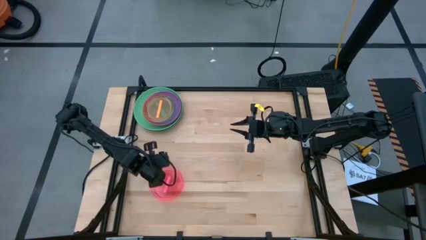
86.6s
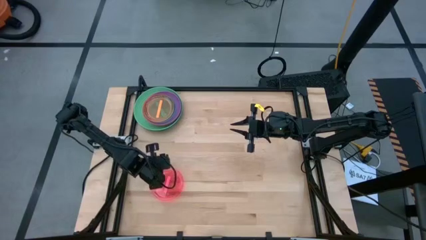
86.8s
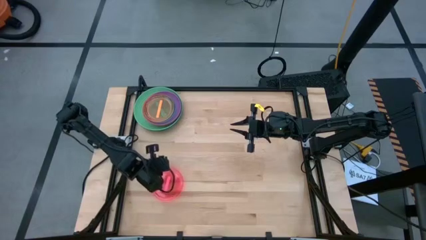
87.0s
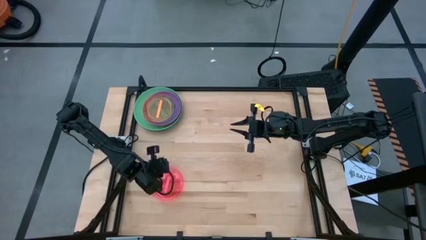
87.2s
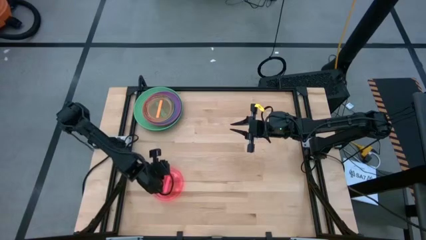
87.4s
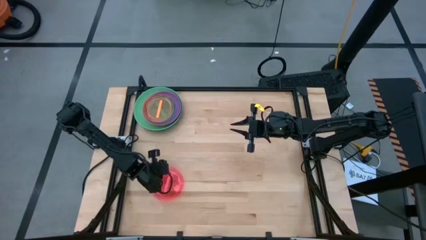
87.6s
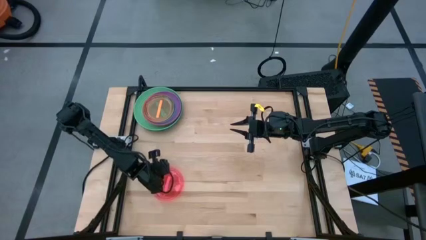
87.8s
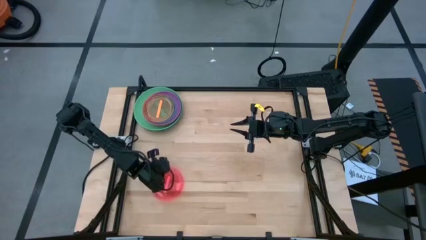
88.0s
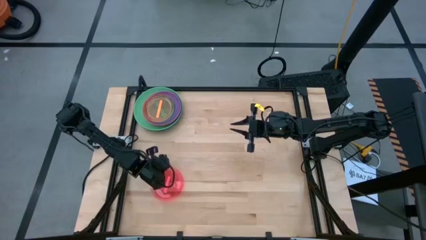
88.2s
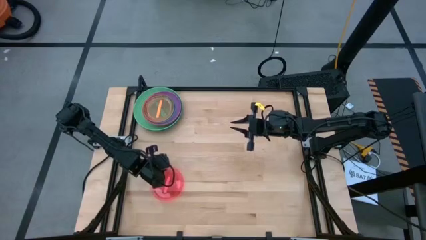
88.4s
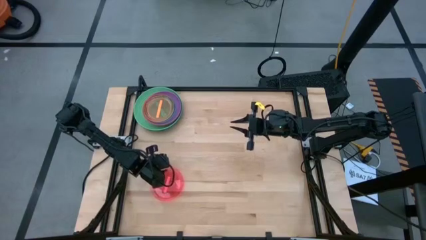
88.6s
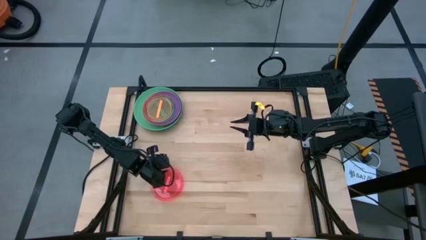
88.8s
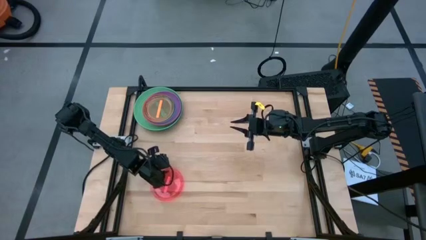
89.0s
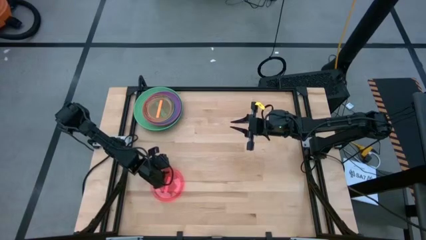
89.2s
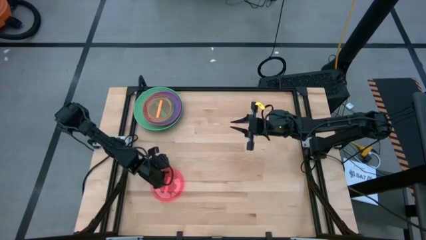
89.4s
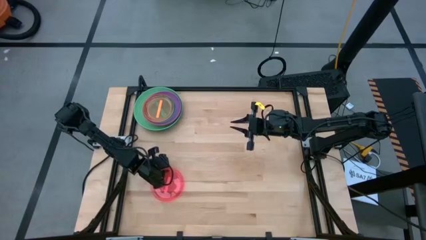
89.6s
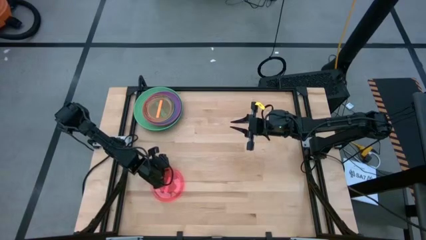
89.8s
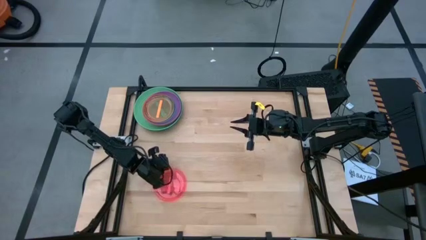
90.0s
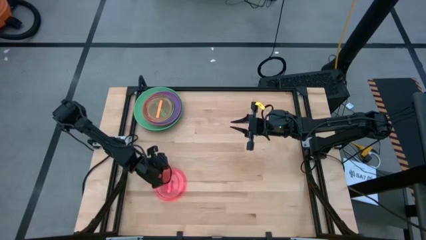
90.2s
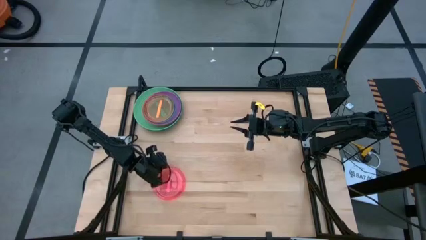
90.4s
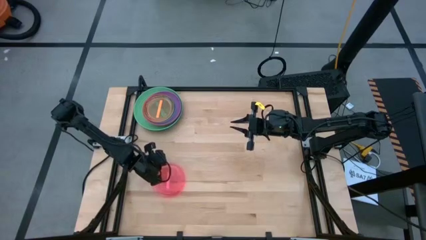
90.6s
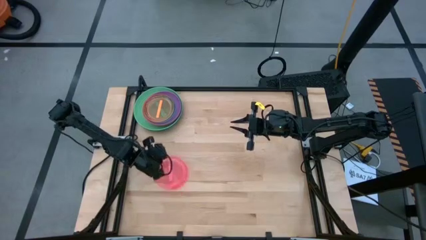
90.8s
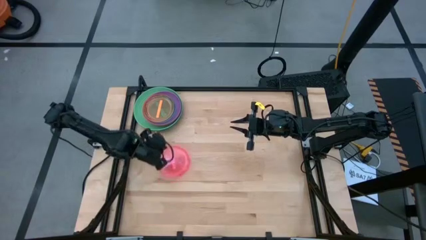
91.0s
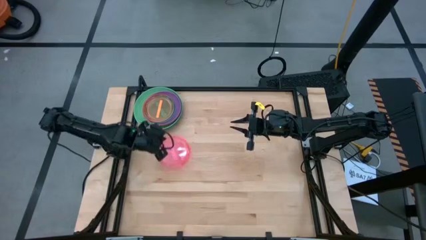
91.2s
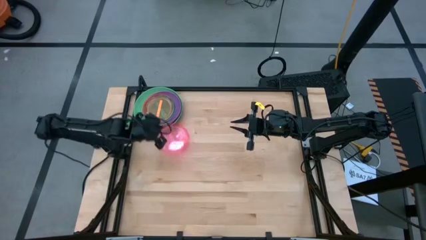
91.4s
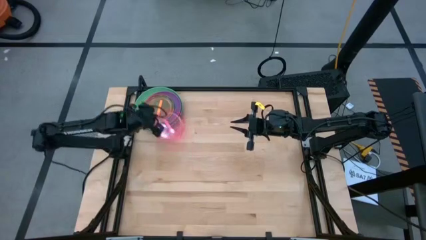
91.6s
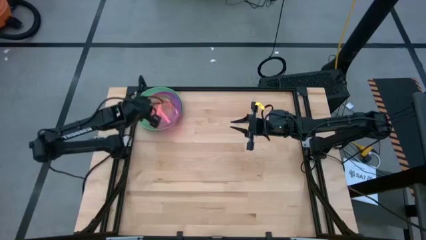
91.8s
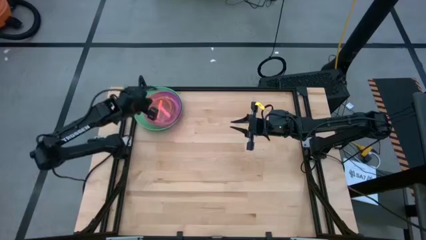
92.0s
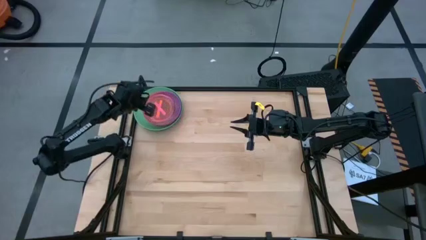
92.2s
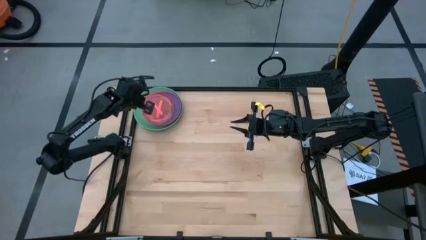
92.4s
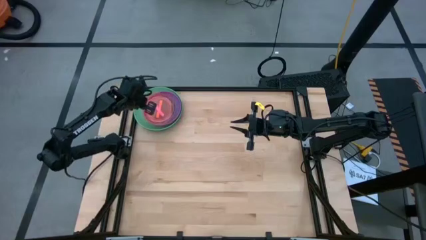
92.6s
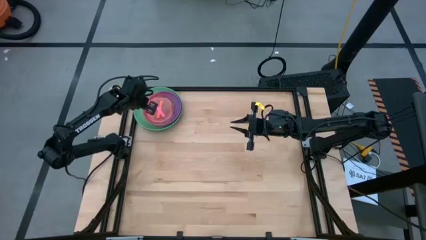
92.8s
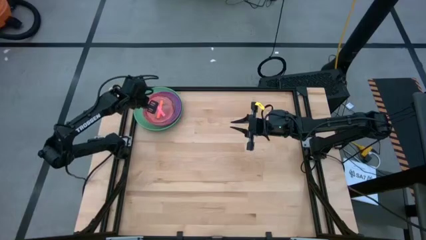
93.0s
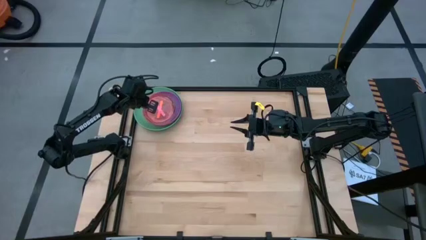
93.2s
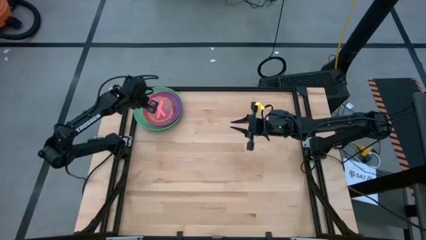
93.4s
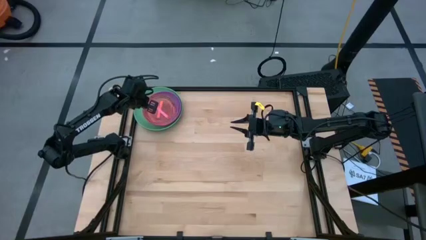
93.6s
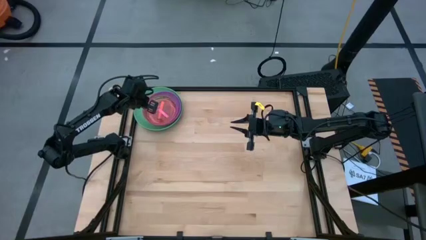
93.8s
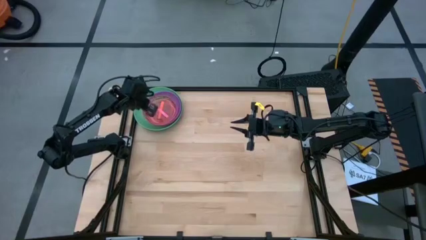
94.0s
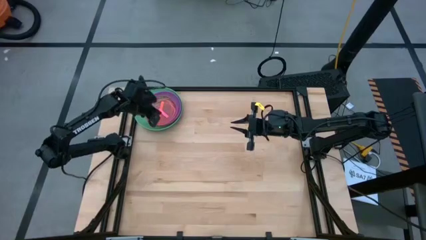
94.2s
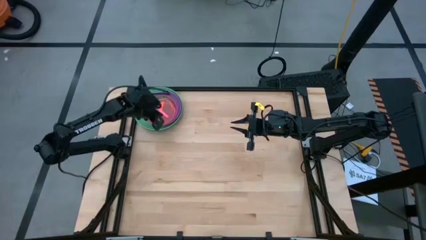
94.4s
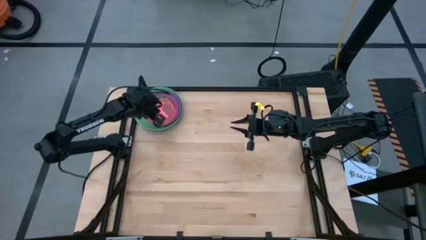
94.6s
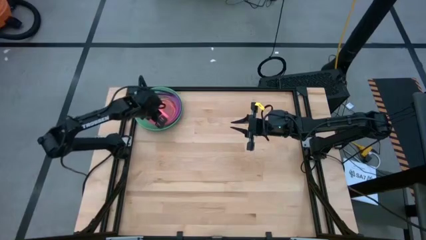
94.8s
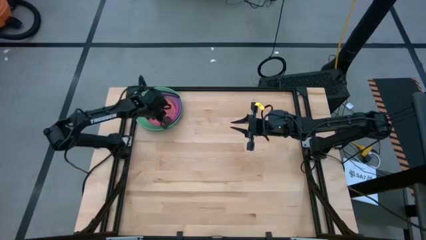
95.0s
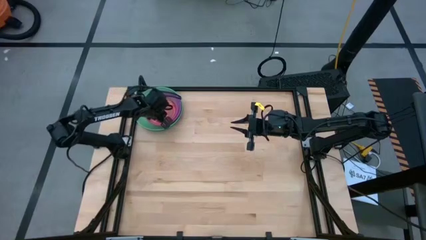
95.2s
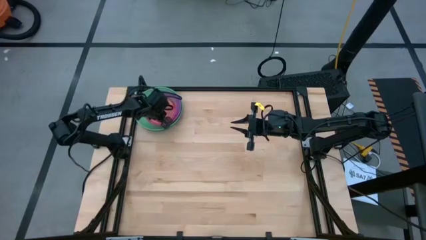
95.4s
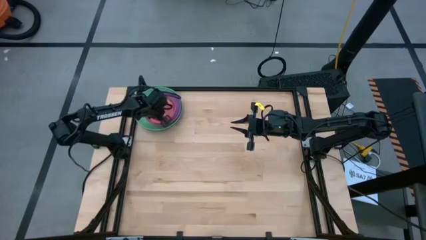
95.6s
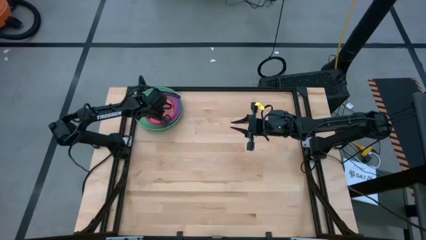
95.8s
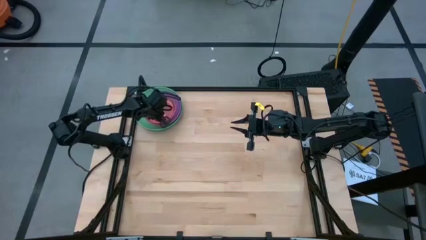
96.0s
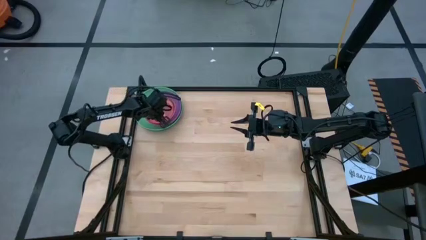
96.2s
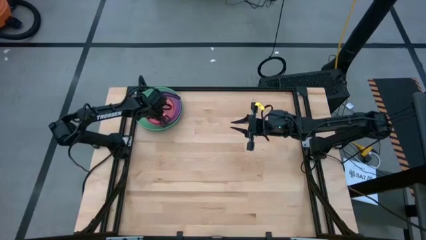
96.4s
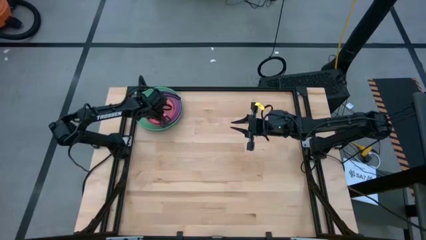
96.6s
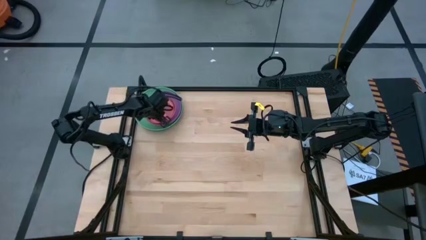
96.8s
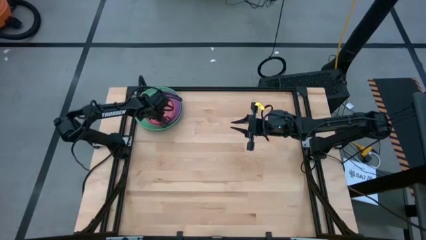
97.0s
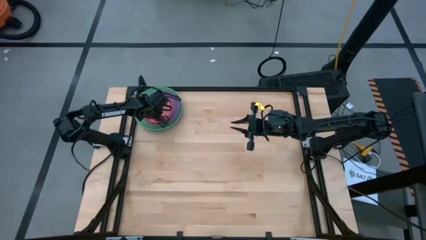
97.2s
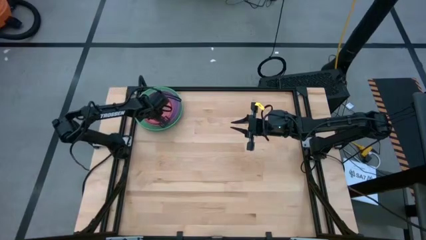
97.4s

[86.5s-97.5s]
Task: Stack plastic plates
Stack the transparent pink plate on top of the transparent orange plate

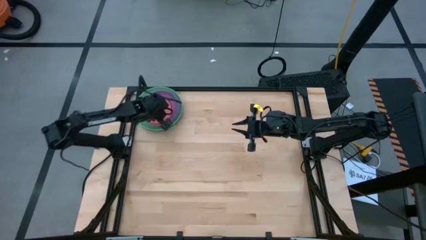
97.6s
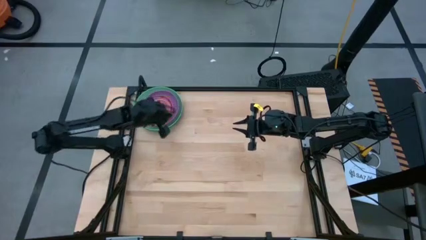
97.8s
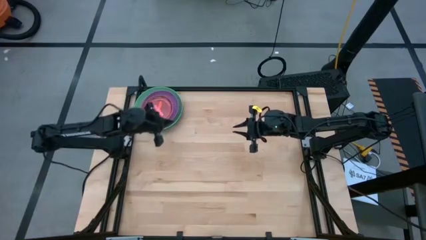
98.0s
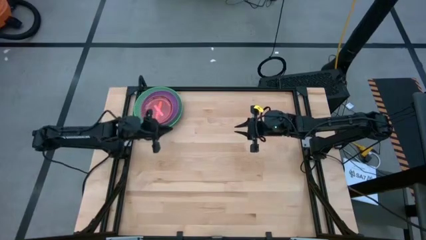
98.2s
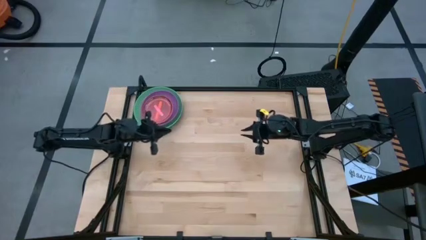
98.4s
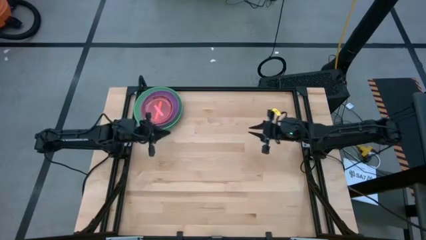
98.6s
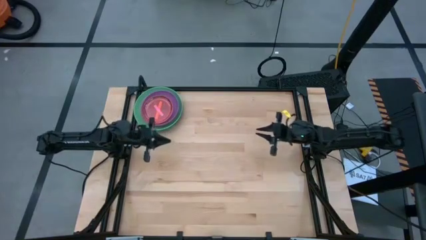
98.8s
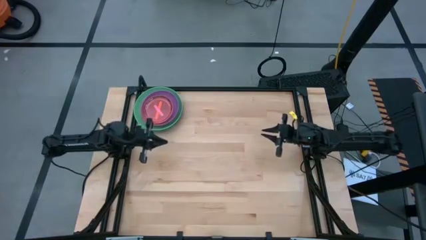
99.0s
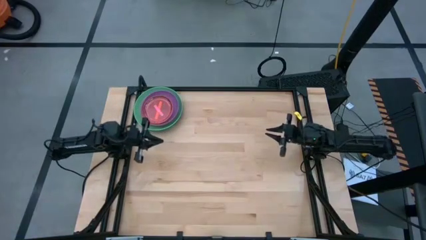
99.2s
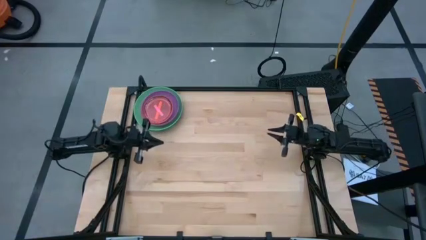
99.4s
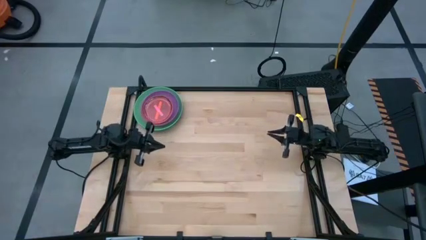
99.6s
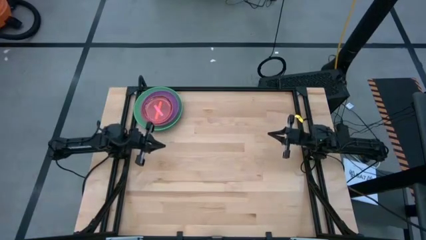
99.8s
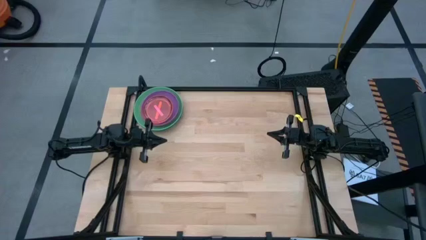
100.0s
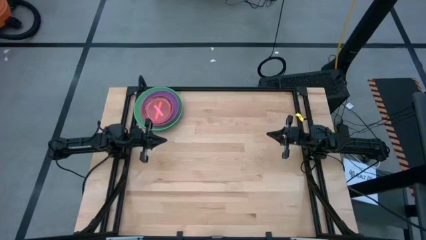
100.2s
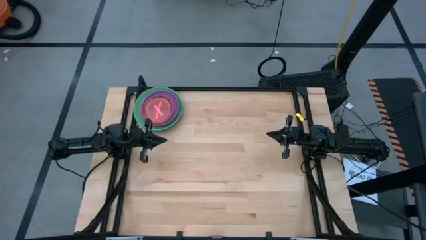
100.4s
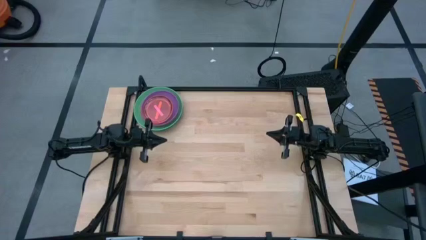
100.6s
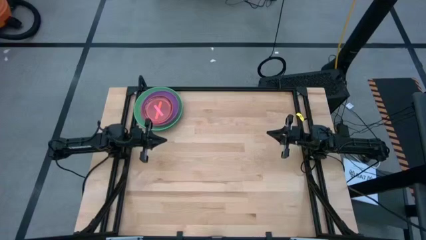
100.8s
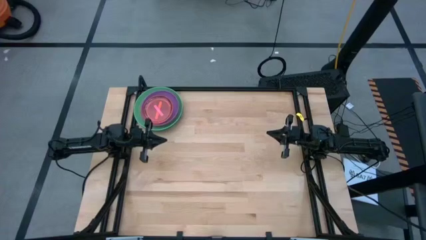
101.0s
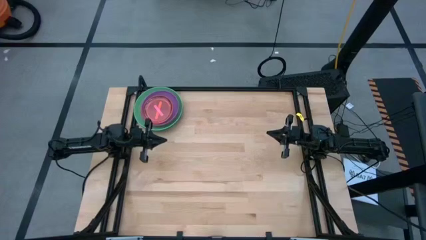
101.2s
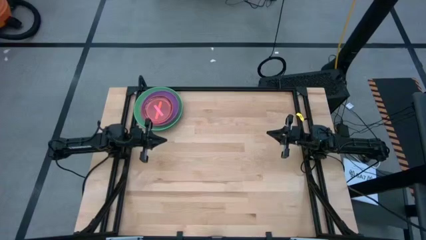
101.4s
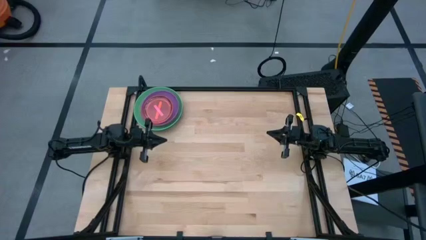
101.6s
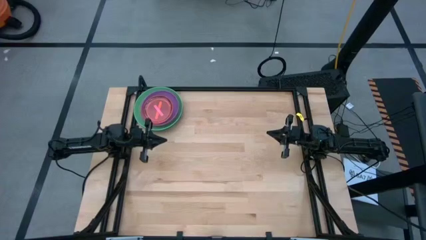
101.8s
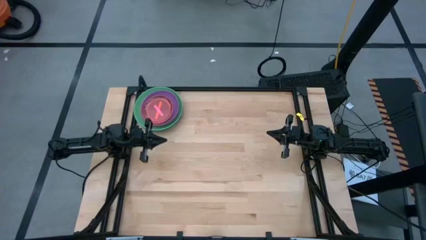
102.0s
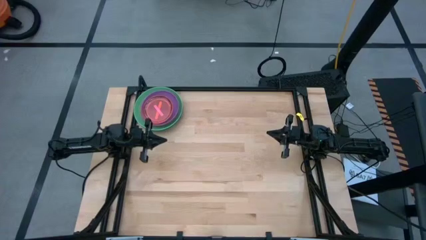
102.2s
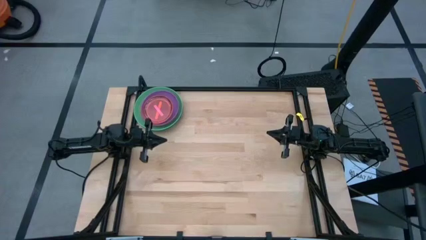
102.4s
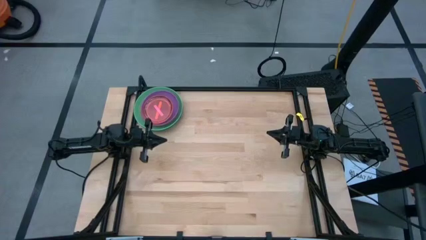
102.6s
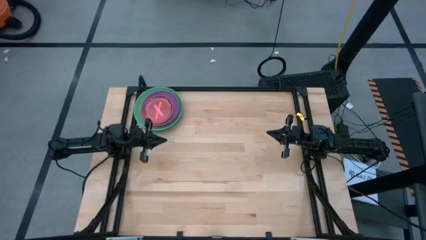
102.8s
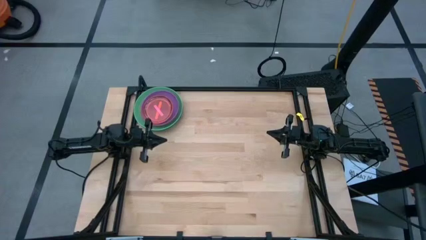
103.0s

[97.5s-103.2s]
Return to Home Position
